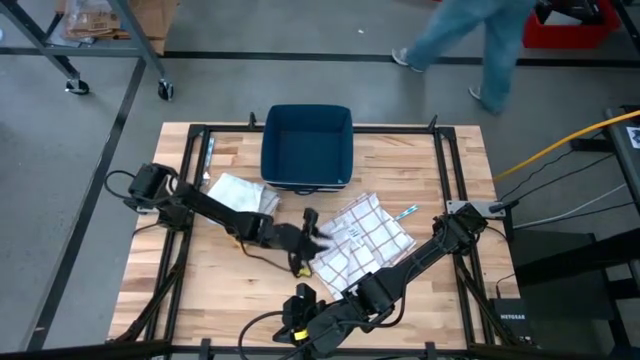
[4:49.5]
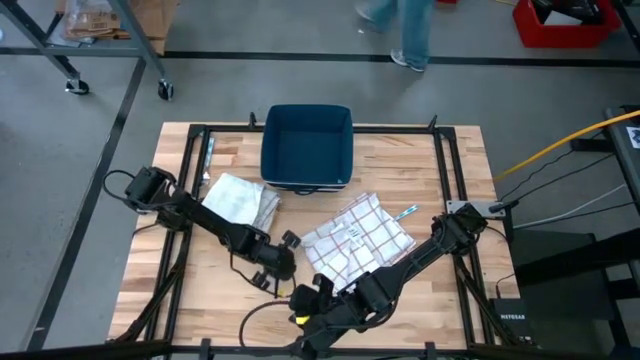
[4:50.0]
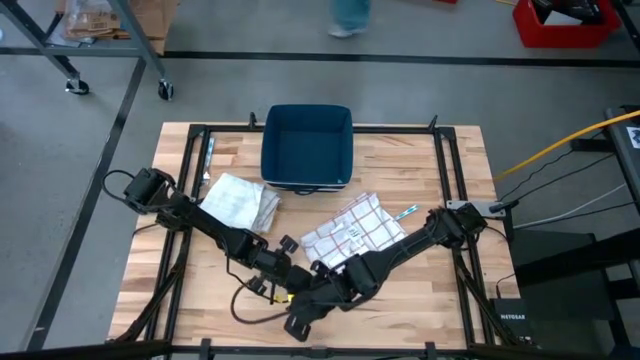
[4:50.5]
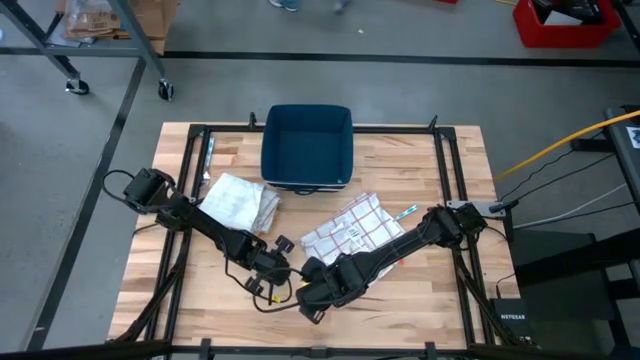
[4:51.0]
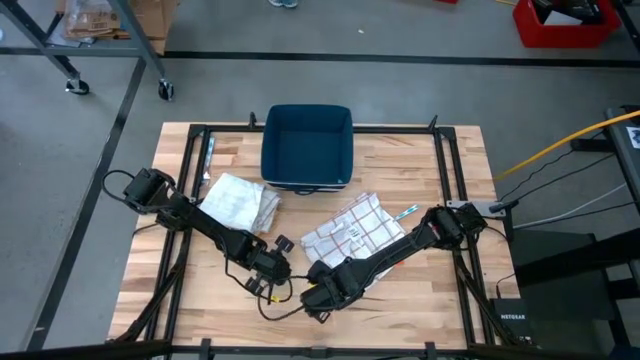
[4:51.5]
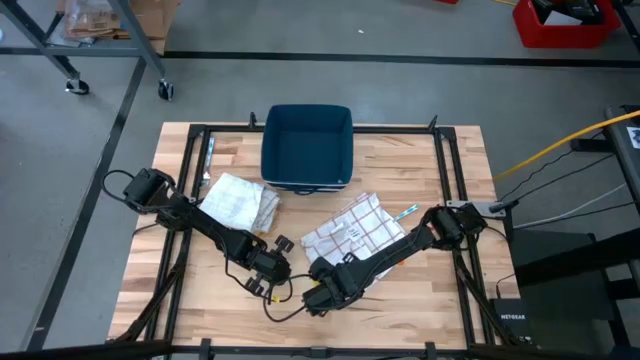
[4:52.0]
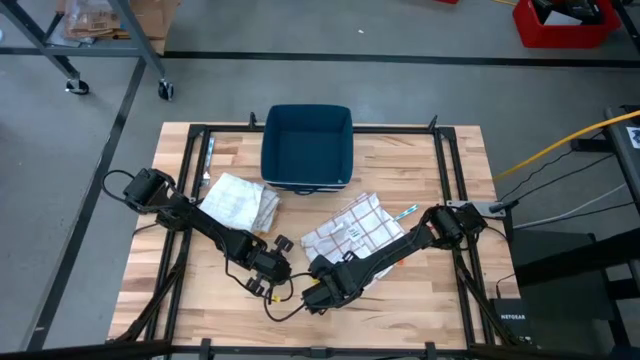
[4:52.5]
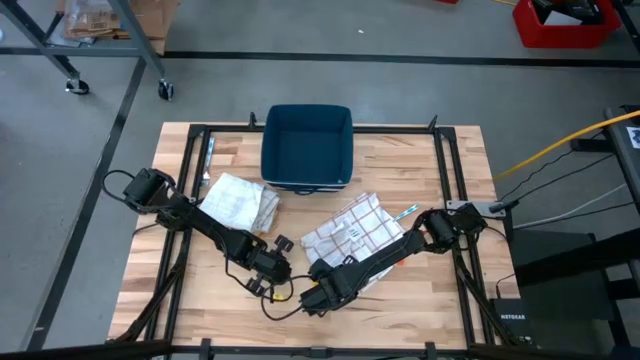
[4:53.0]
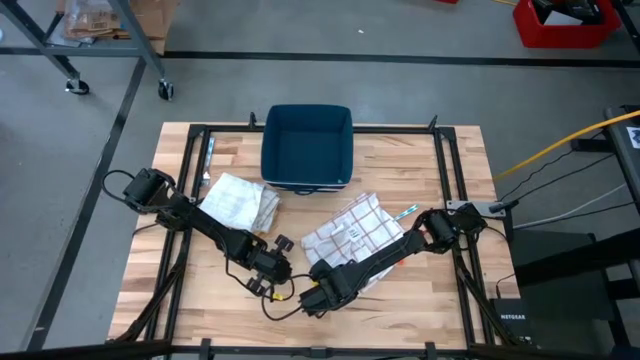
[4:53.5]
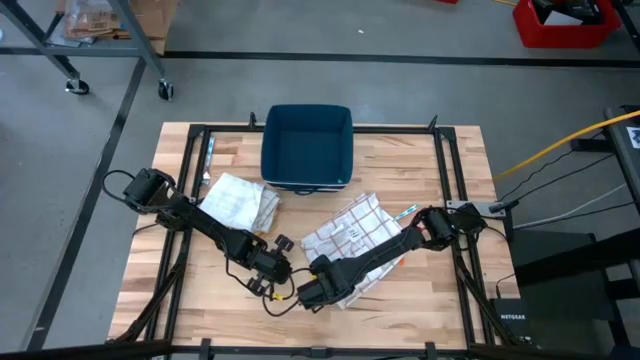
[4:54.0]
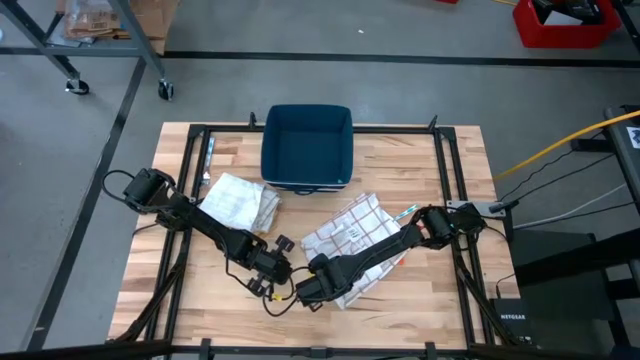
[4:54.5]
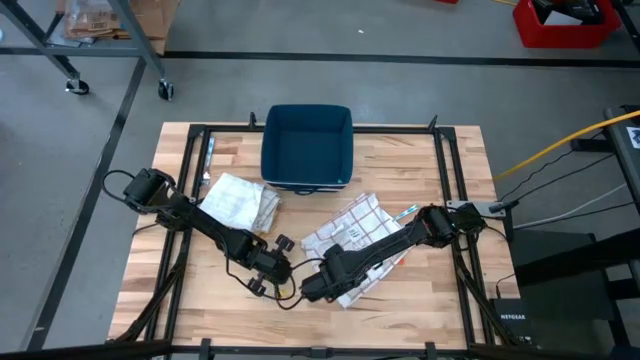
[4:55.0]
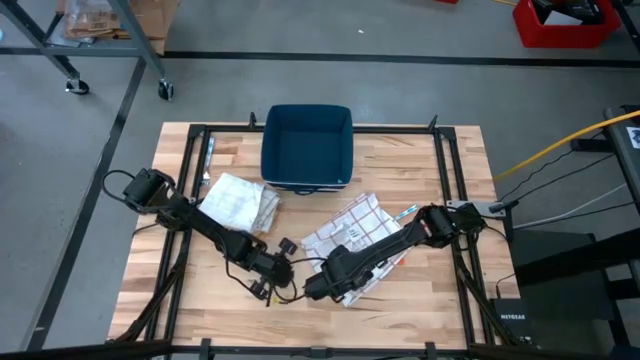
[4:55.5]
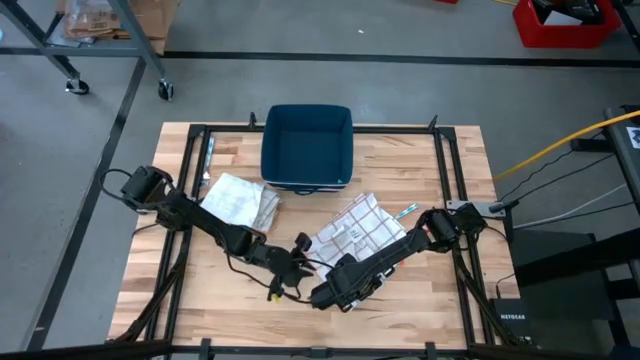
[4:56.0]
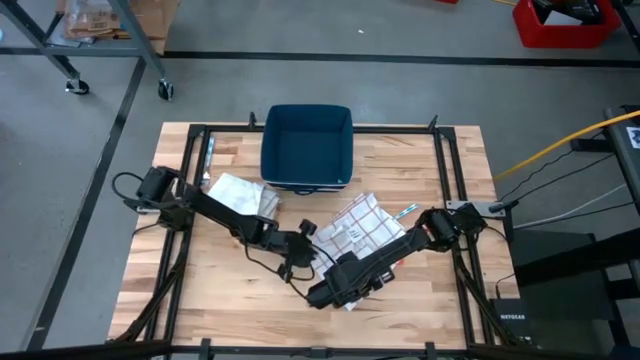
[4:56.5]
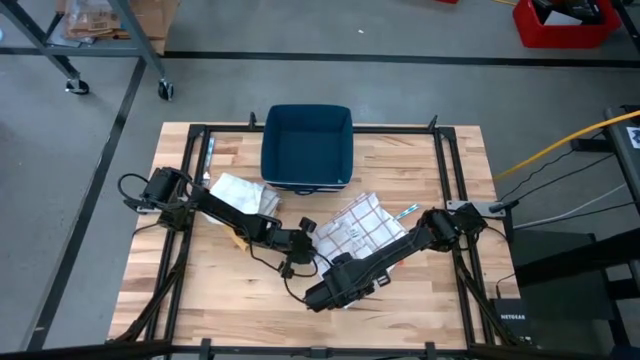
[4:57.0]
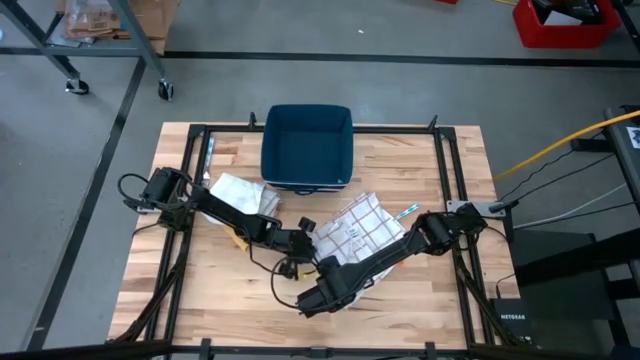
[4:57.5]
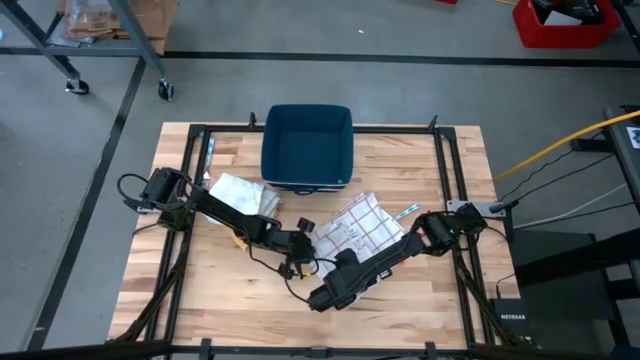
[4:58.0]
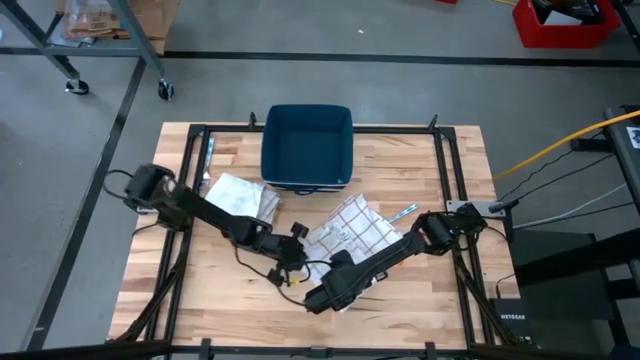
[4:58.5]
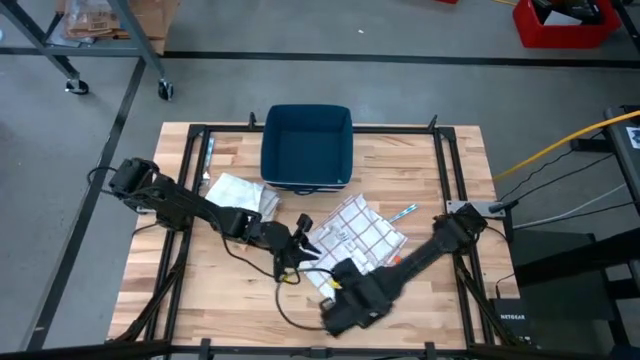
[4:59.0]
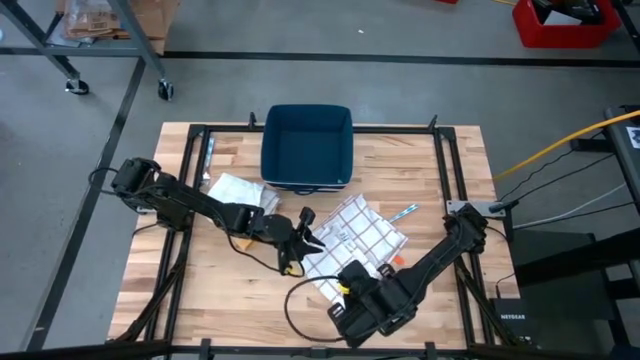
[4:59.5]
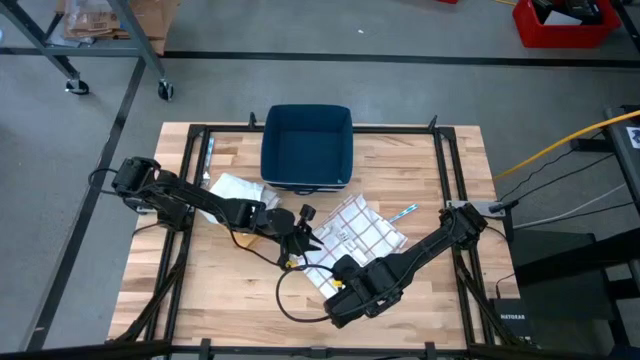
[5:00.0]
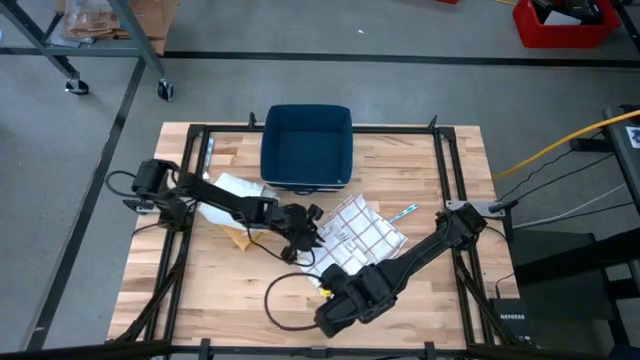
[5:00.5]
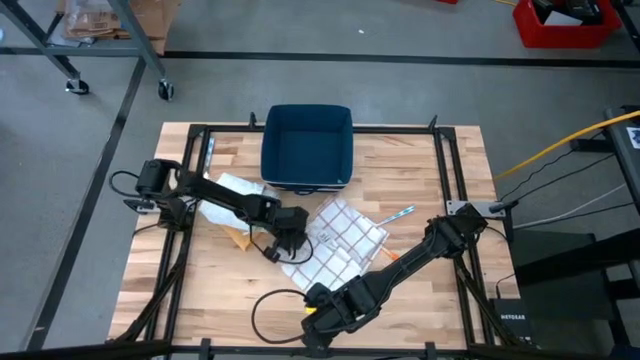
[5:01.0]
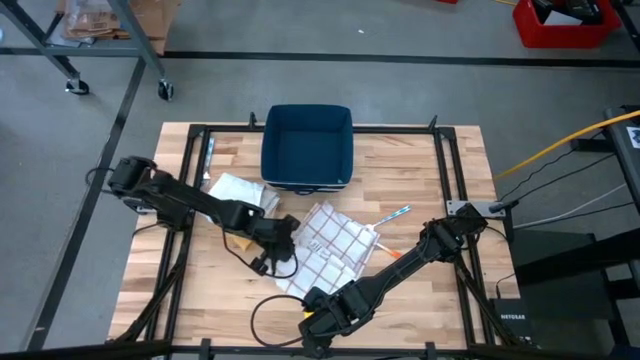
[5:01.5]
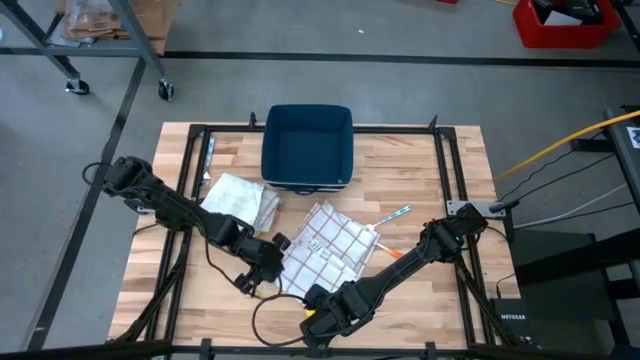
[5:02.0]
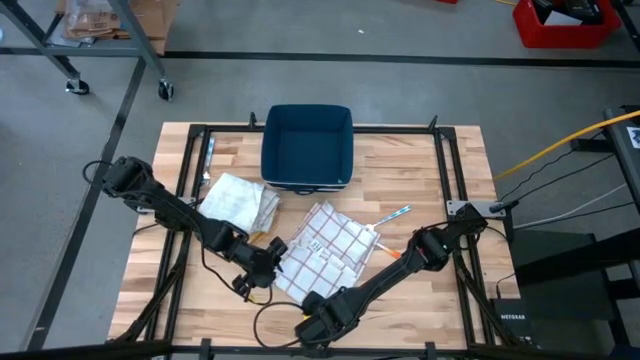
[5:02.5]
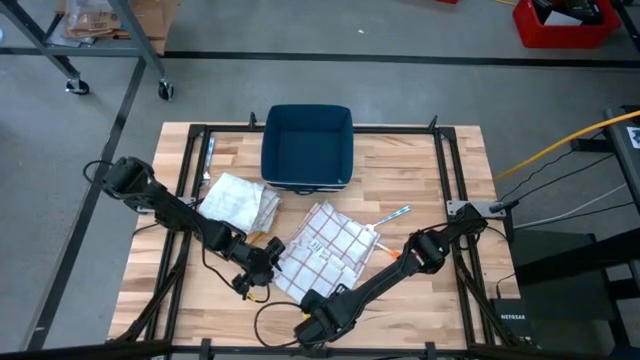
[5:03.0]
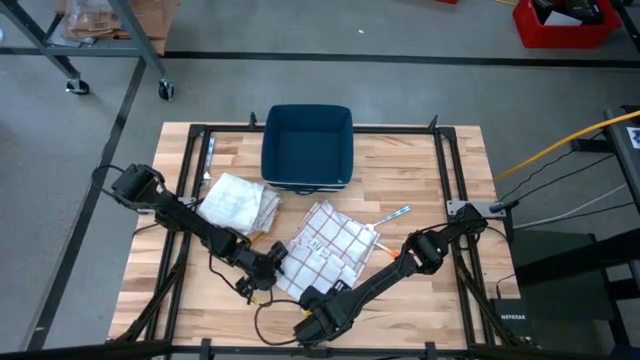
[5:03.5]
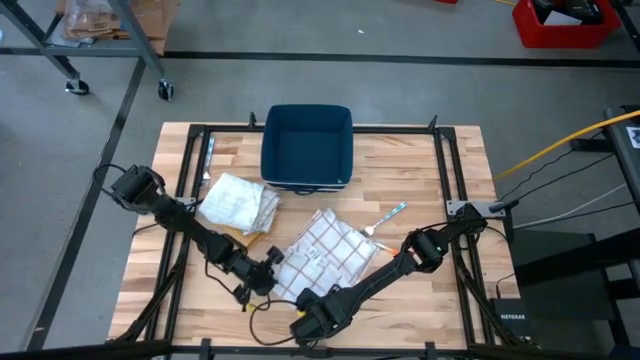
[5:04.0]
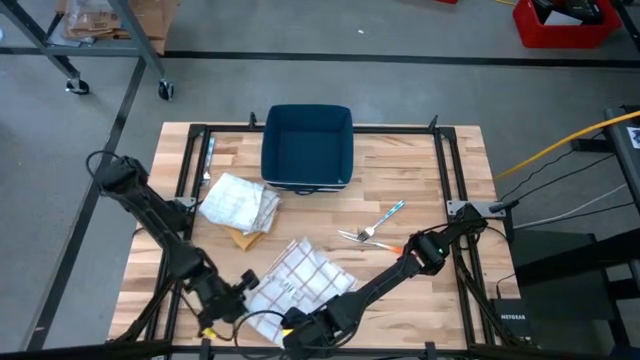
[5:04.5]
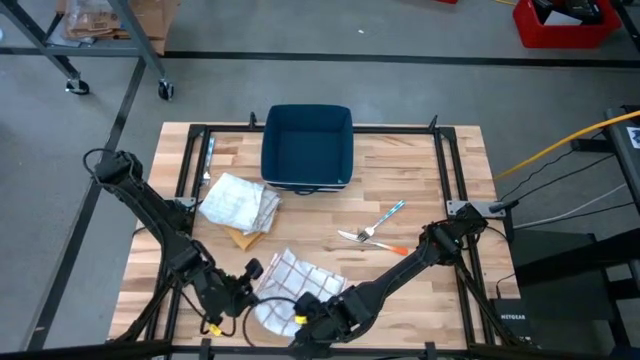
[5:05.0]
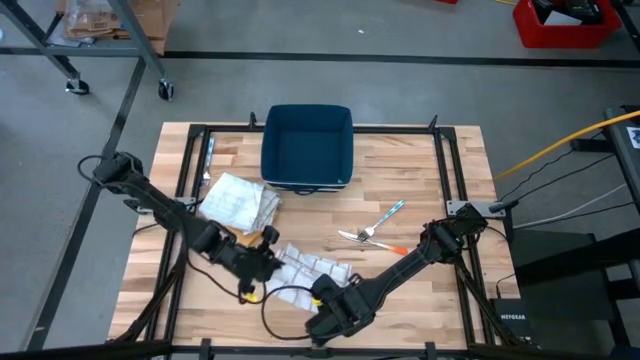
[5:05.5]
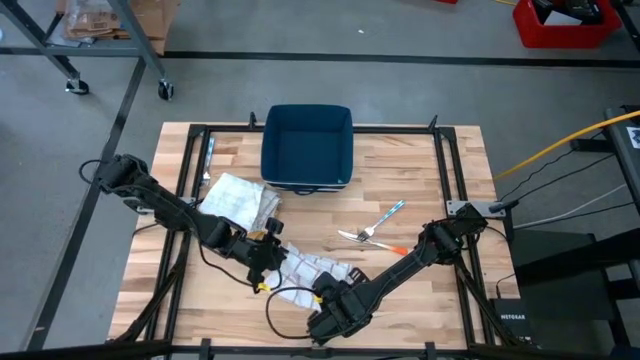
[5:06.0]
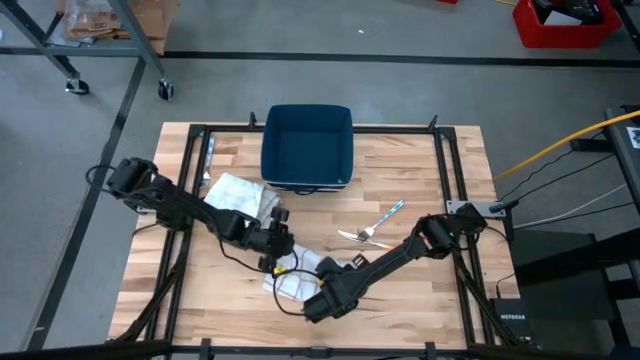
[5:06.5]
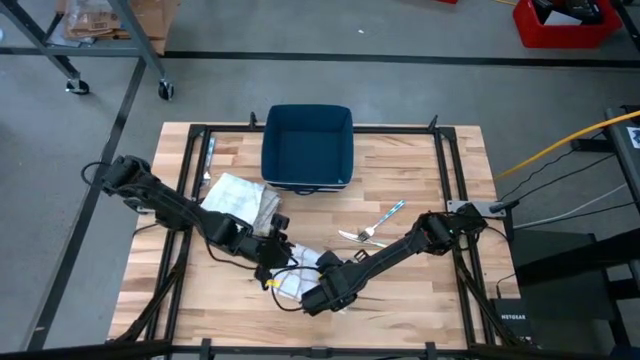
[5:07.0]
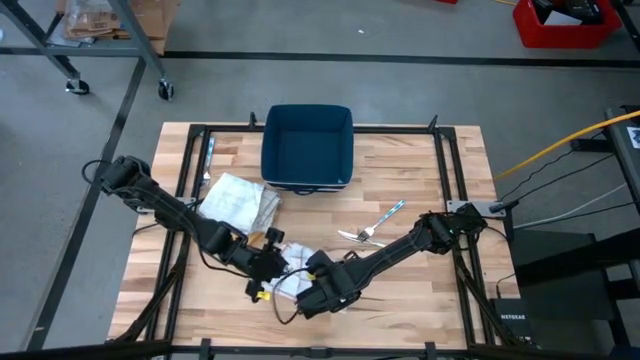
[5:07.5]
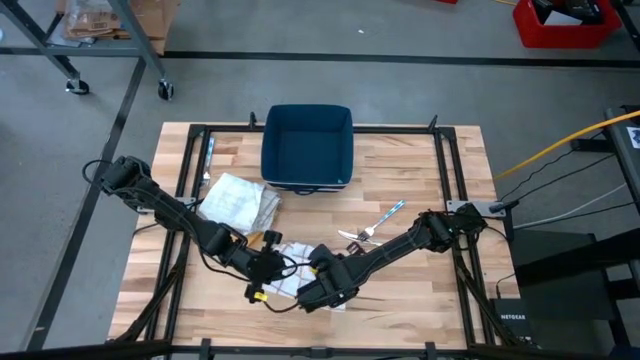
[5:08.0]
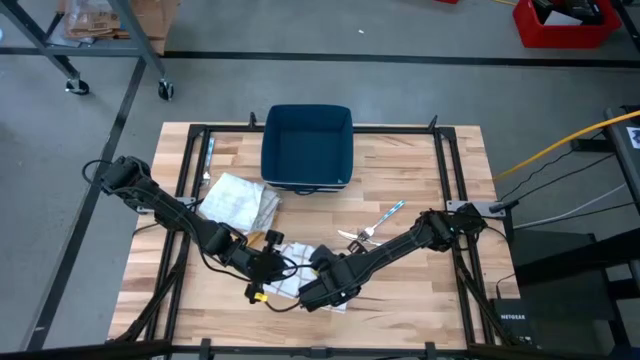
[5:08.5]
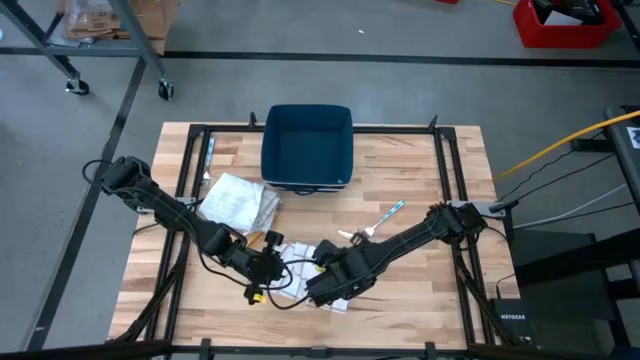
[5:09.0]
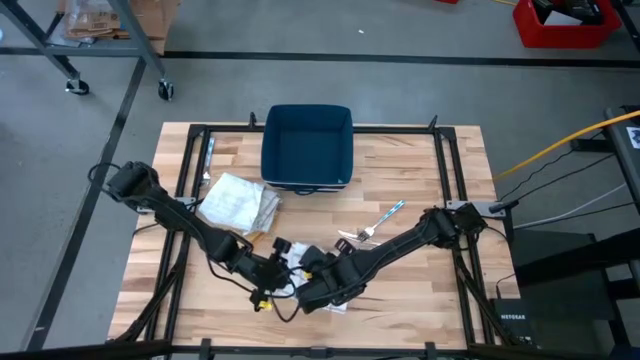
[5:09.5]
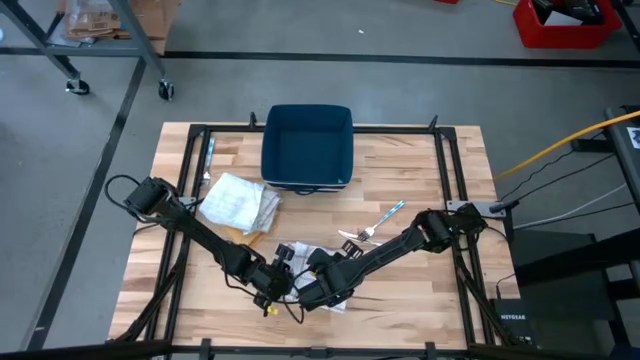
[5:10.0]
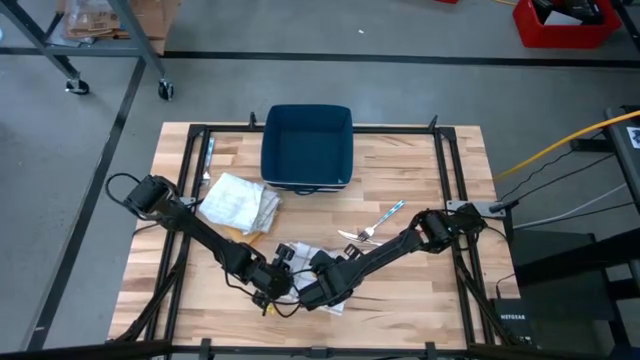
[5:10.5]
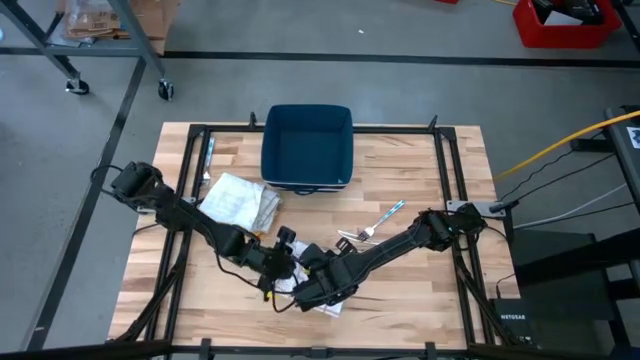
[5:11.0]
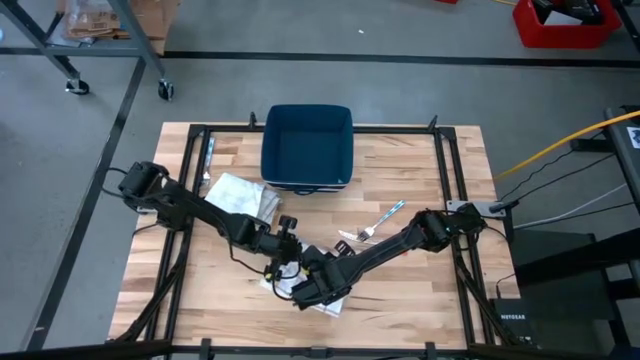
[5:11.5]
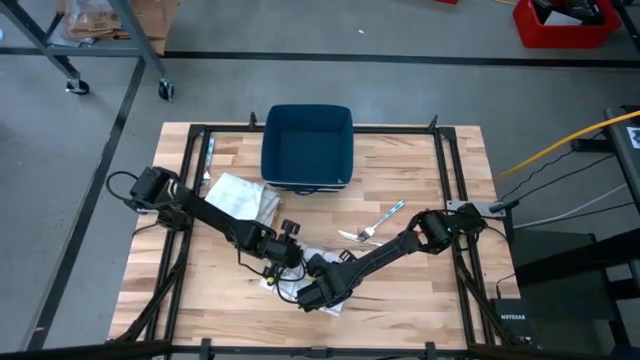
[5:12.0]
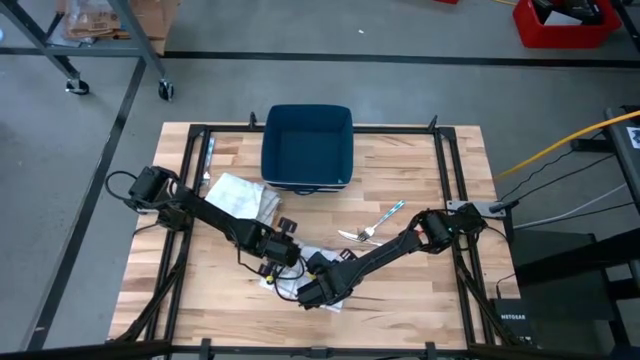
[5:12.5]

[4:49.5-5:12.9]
Task: Fold towel
Fold the white patterned towel
